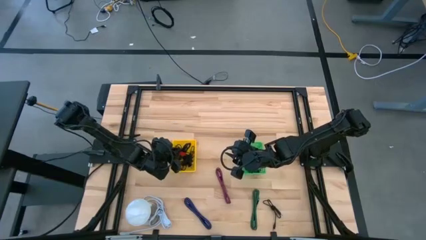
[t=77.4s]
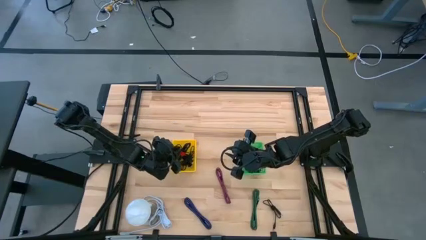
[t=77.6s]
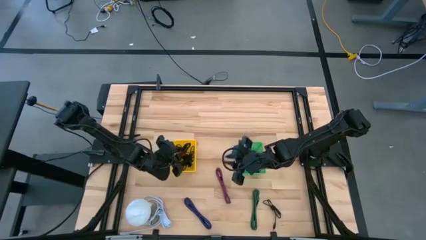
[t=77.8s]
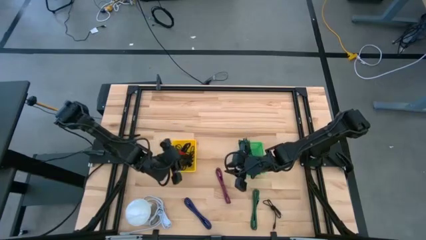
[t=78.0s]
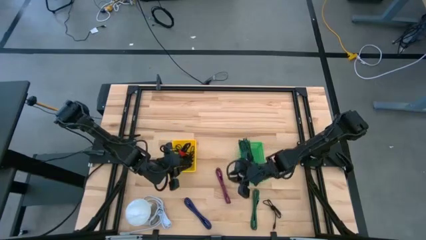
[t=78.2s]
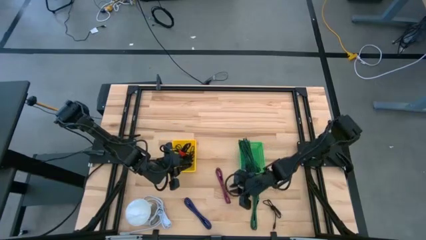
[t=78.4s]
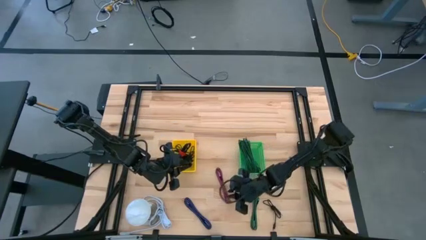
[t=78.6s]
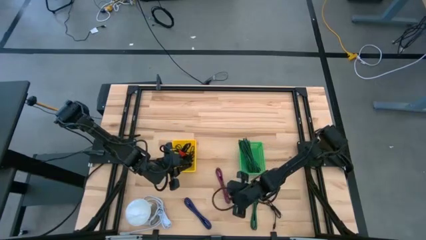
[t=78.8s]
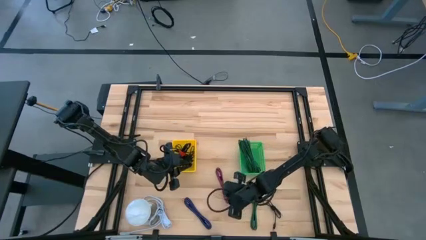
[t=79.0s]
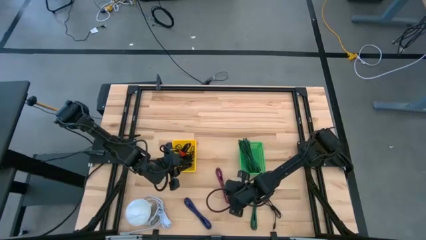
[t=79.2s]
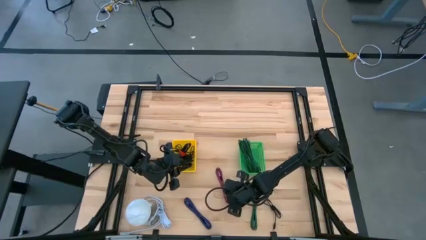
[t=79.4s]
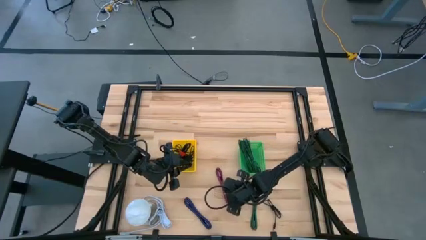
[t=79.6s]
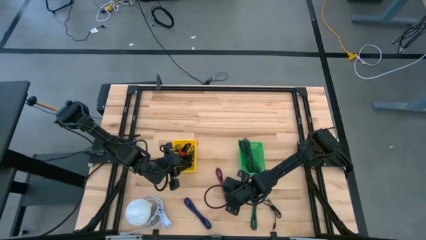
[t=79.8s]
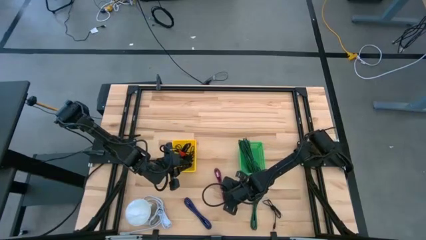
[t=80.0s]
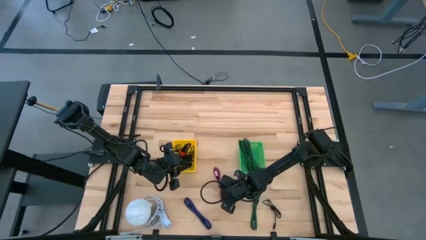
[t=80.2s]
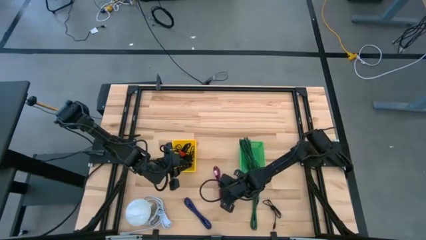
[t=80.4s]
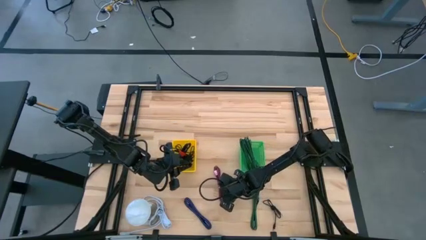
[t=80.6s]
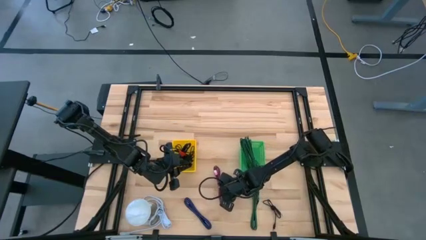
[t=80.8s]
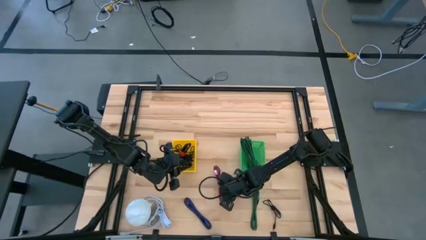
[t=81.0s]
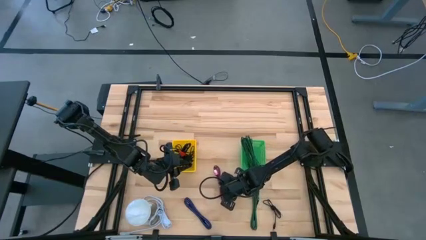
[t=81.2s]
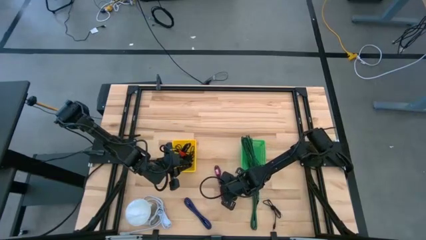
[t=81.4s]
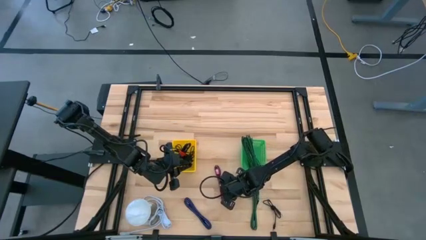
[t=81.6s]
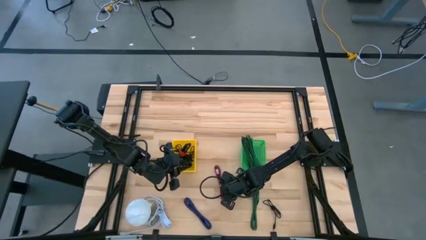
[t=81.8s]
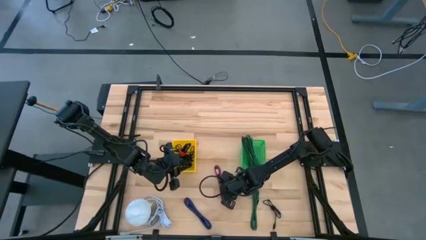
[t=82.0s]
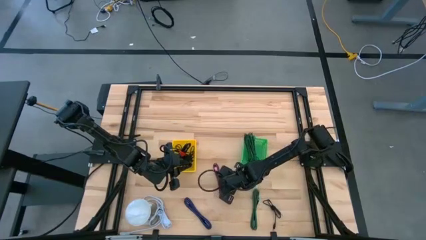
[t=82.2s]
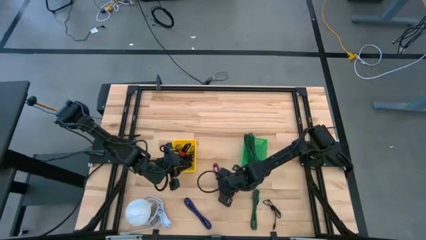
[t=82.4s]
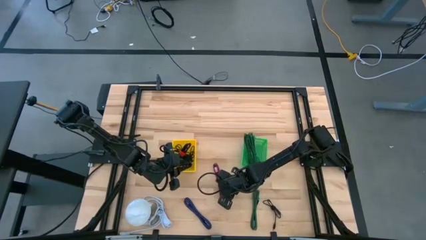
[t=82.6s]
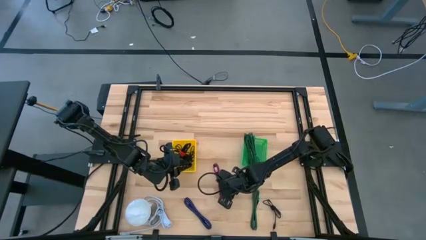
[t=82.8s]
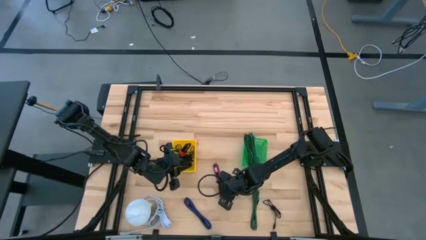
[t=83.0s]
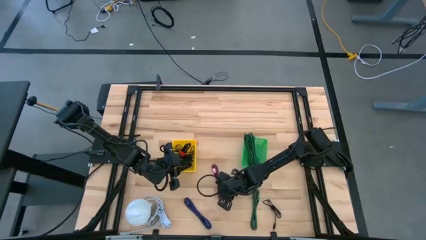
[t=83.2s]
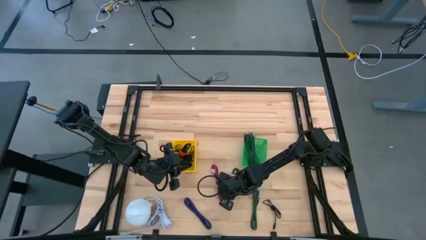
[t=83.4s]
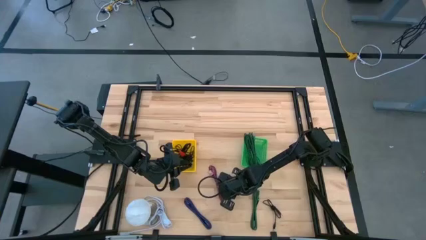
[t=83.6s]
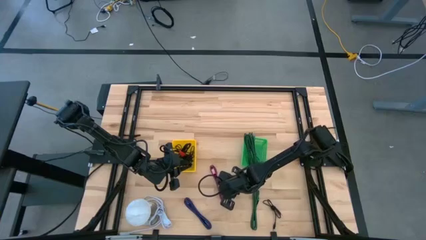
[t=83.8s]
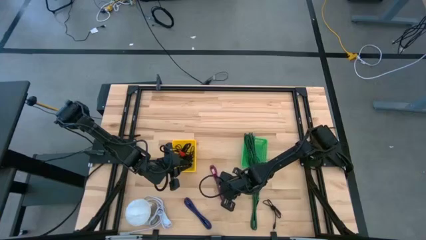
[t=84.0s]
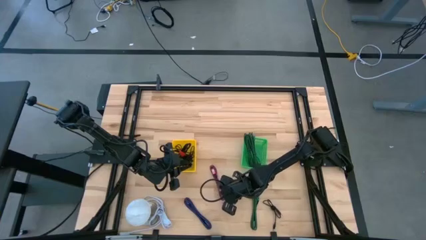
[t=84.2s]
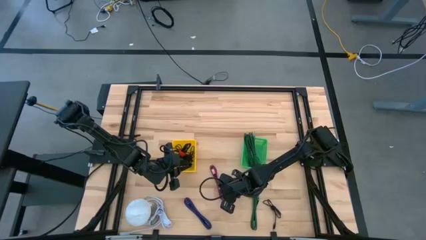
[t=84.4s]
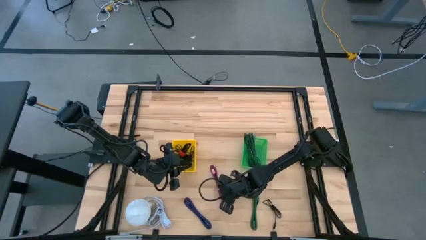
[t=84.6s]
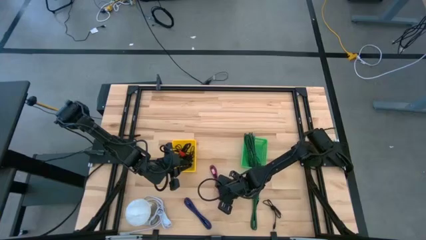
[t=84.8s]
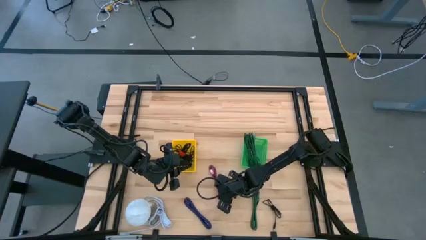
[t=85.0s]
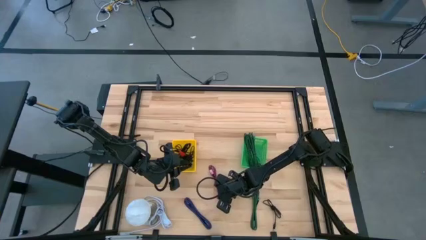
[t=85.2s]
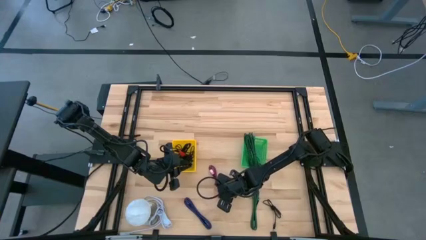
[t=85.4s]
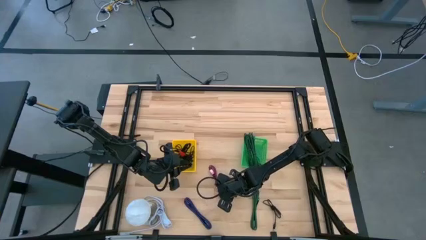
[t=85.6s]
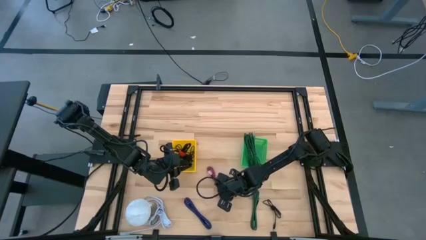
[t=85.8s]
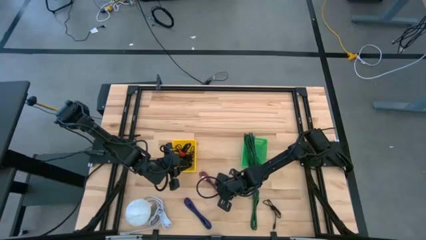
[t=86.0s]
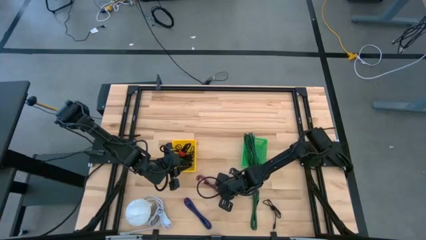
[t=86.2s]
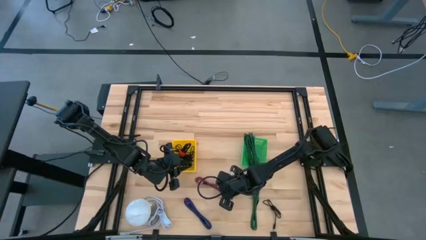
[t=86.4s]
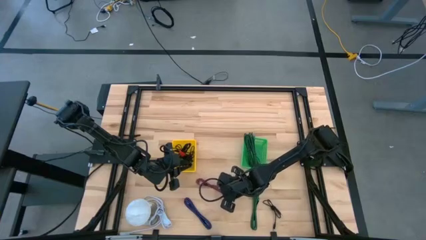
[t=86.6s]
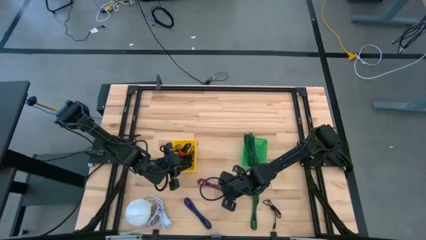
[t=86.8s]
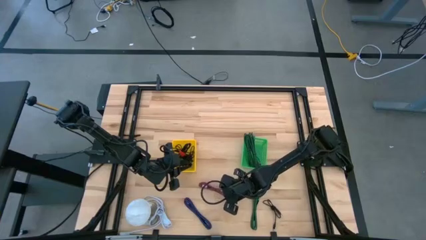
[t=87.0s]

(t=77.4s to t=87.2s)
Task: Pick & Place USB Port
Put the black pink charger cable into the green bin

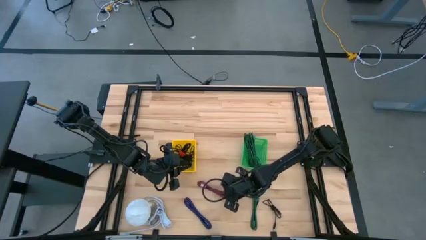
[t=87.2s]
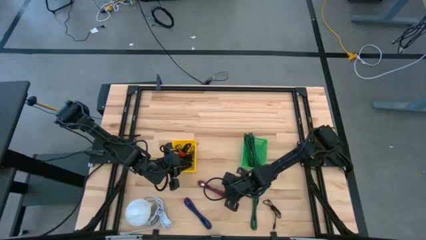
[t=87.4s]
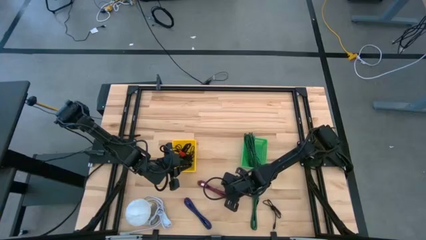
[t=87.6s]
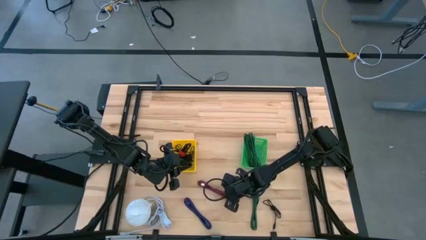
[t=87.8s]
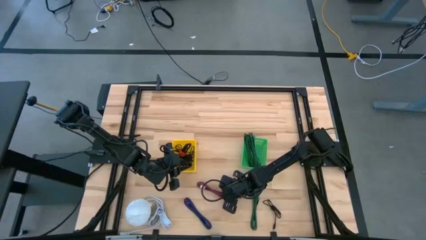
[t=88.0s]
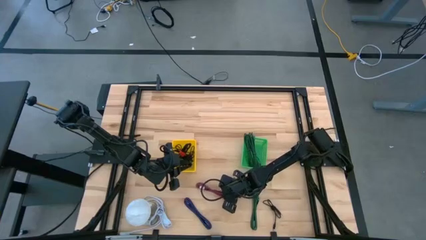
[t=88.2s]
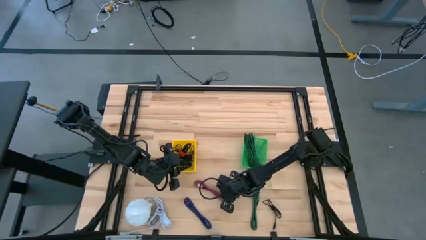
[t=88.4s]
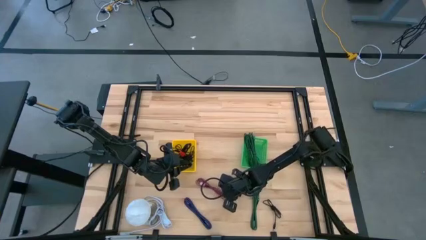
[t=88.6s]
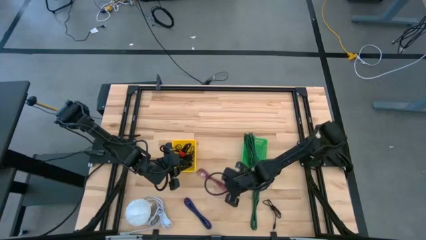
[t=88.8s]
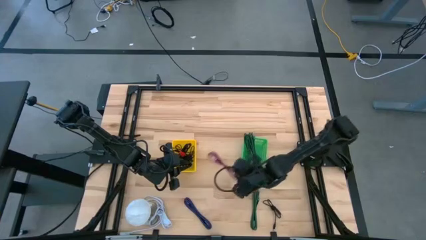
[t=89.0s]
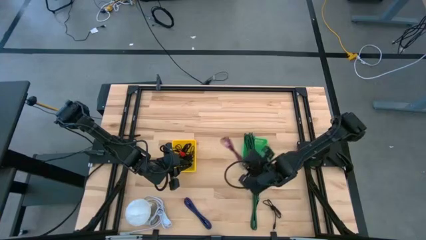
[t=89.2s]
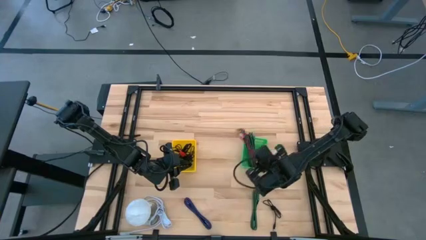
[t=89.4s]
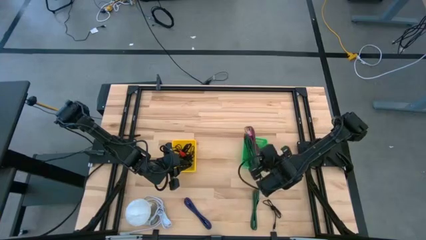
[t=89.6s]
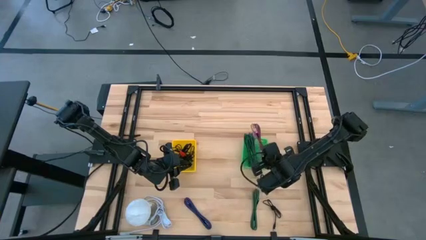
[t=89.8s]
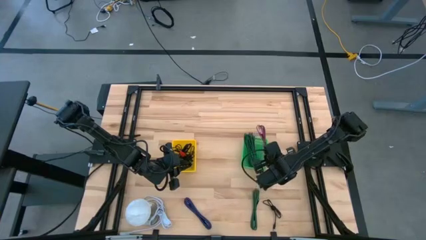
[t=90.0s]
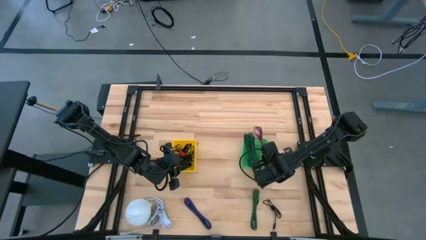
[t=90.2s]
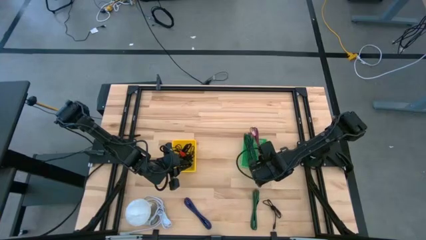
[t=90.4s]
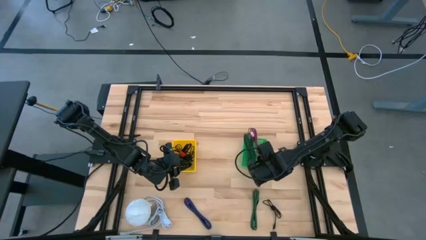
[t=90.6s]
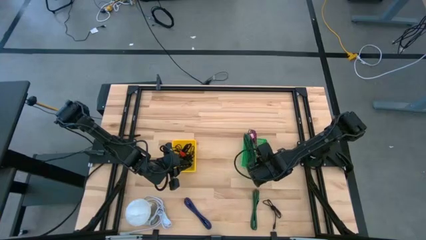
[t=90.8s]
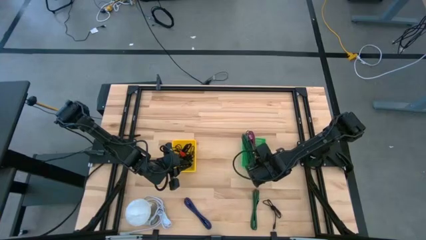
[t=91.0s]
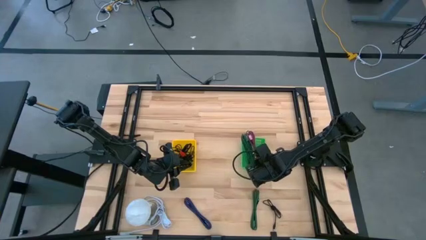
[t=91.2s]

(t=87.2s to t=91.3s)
Put the black pink charger cable into the green bin

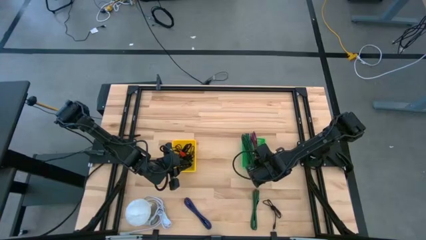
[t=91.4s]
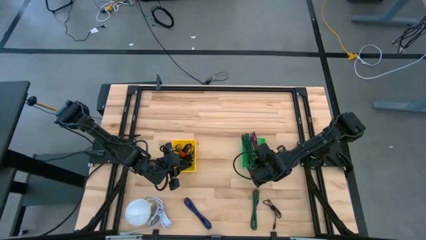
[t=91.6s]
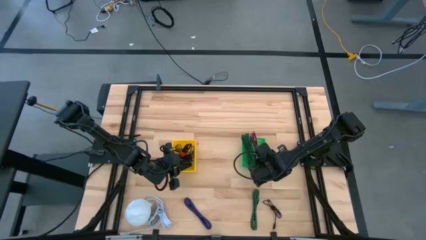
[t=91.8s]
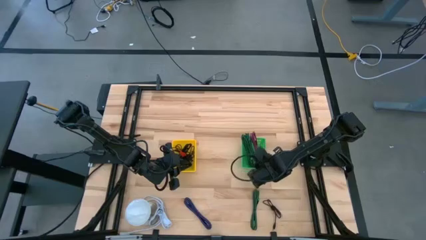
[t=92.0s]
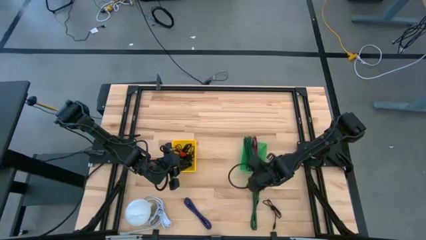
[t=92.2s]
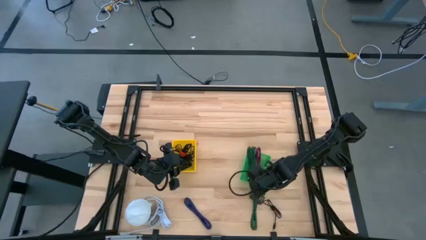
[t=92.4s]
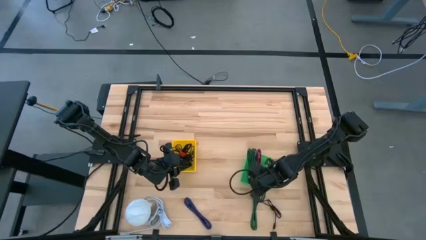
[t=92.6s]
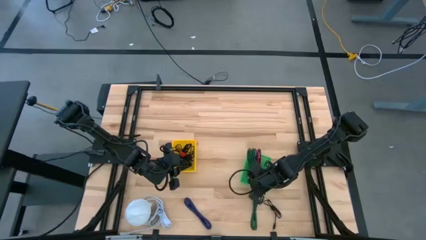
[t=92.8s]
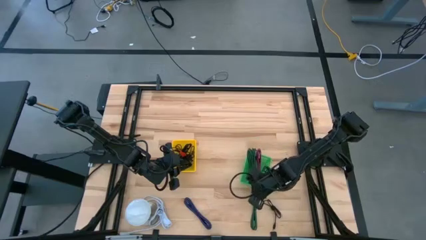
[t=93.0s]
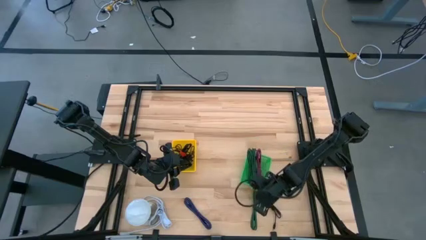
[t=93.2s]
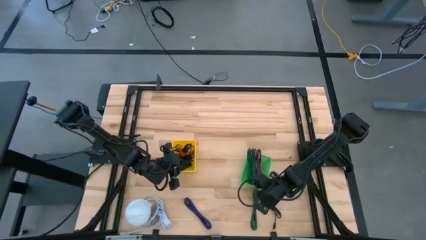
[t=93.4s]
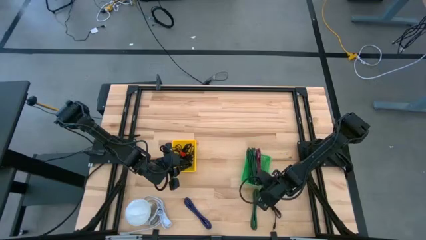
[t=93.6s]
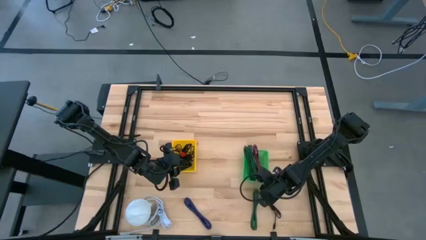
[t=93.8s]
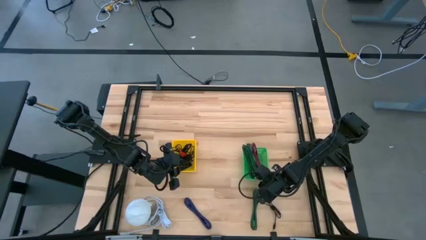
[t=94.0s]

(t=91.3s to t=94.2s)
Adjust the green bin
